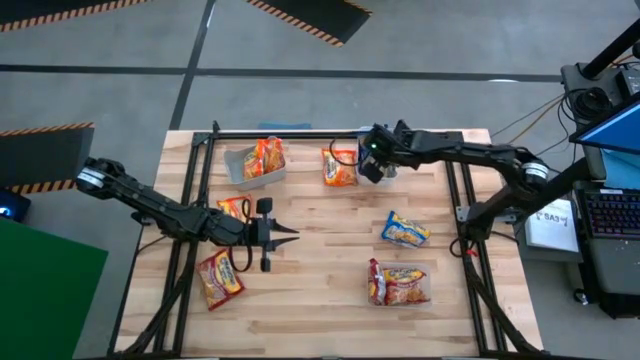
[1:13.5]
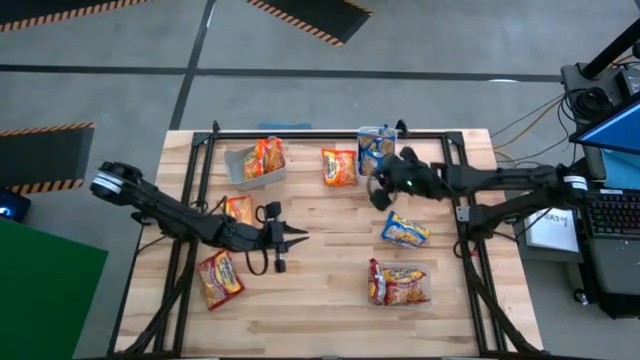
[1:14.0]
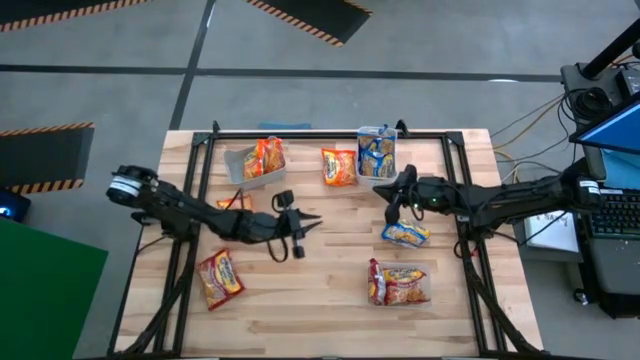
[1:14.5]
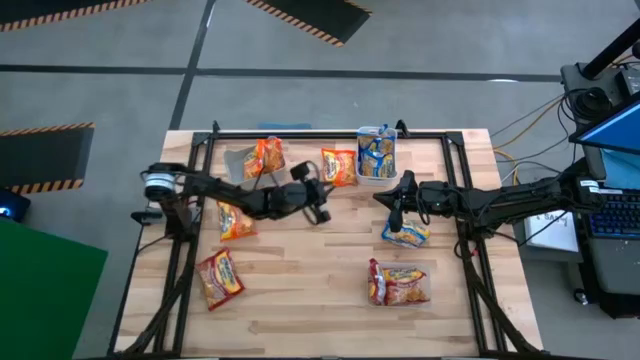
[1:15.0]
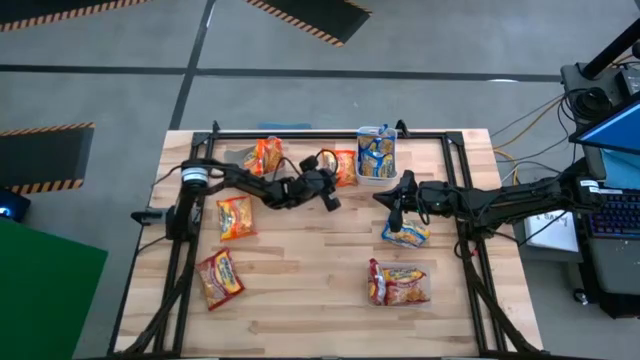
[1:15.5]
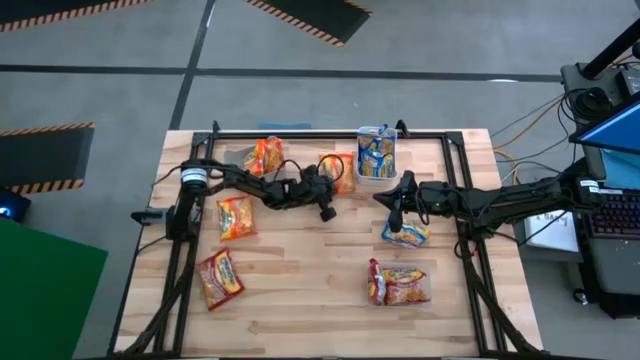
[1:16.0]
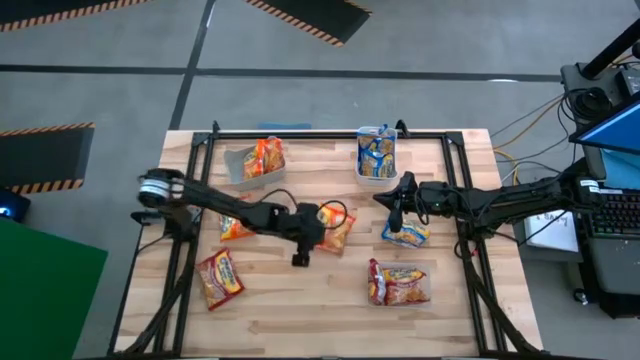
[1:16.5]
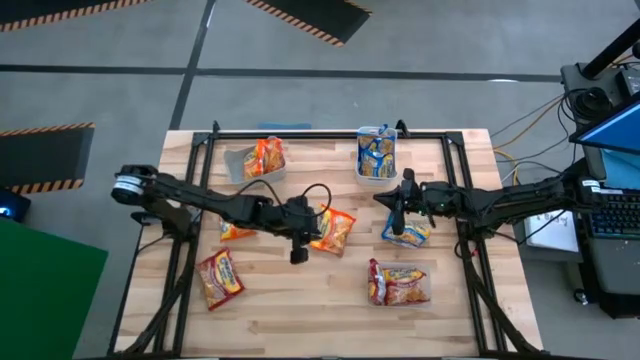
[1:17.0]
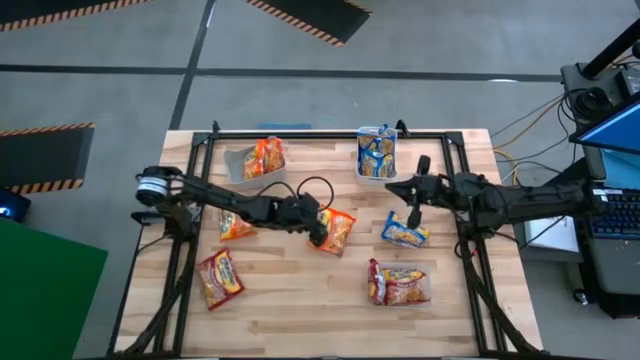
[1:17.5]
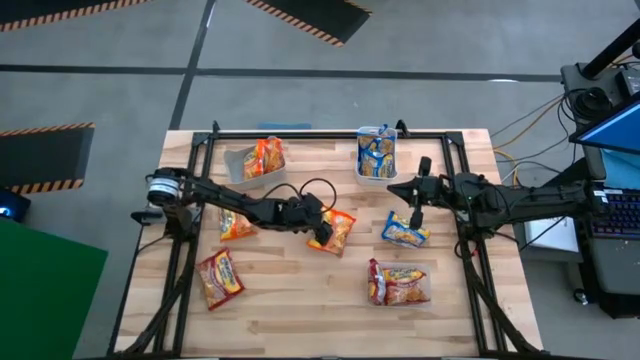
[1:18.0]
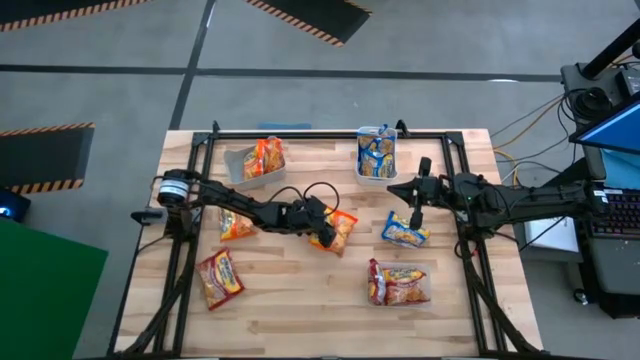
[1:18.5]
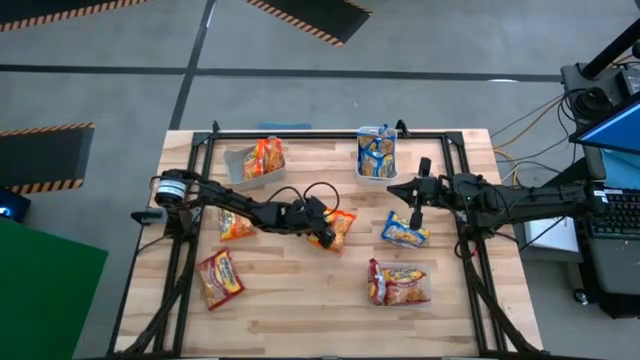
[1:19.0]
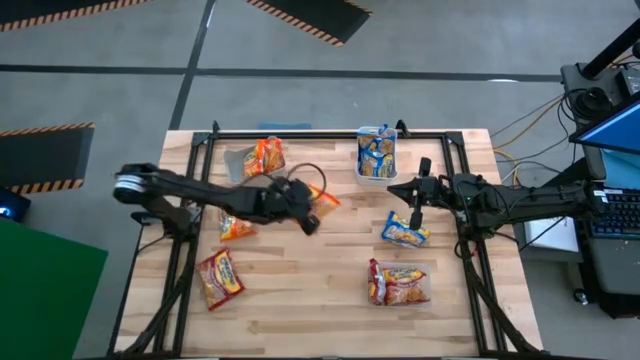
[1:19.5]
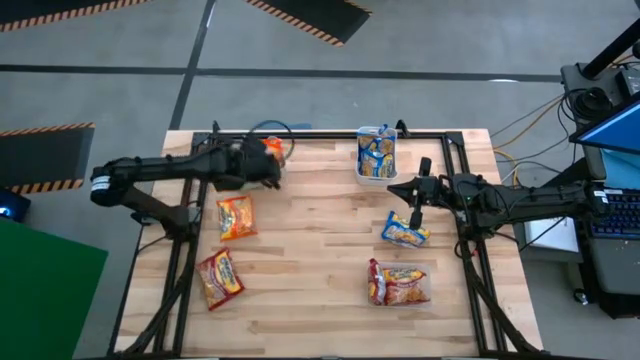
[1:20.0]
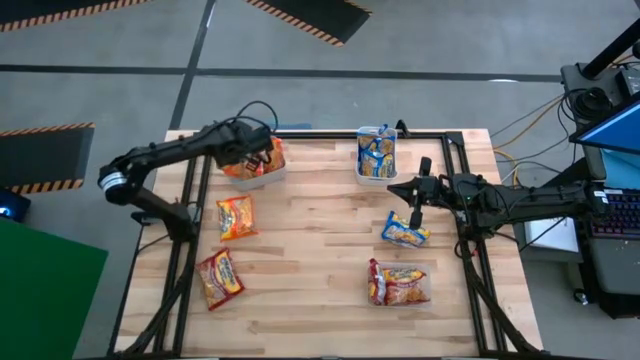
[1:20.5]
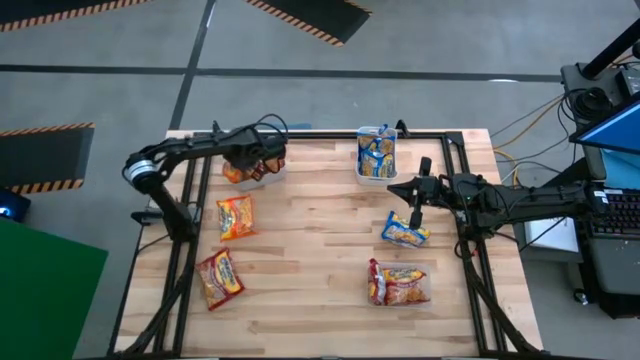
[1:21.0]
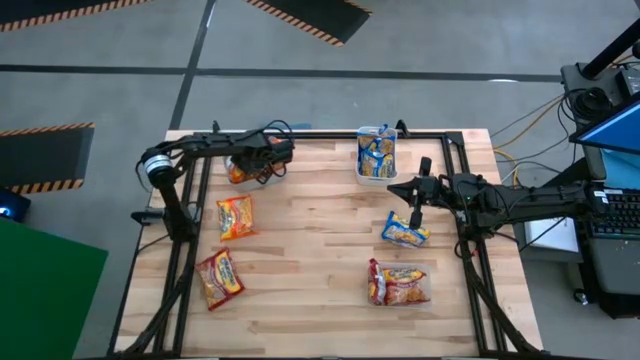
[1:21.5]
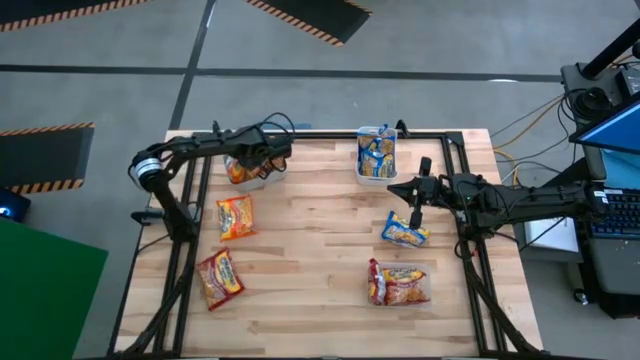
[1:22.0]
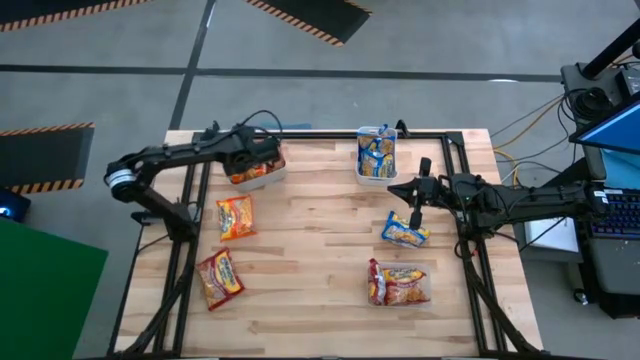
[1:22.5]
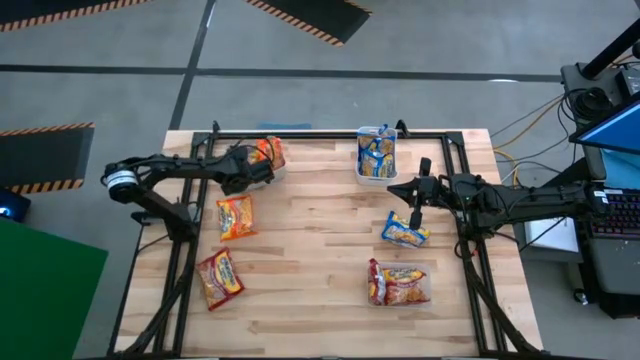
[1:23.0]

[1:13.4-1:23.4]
Task: Sort Maruchan noodles
Put the orange noodle pack into the gray bin

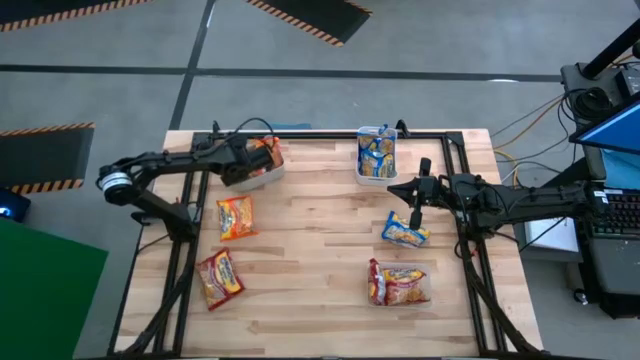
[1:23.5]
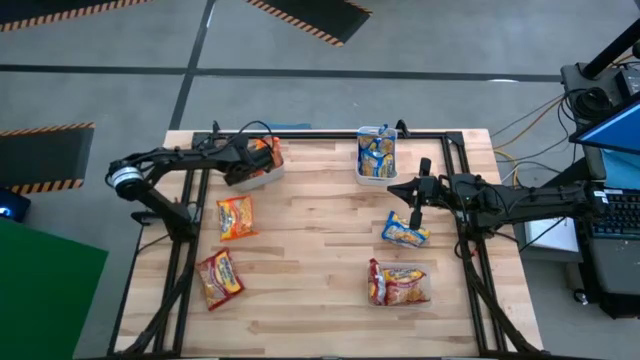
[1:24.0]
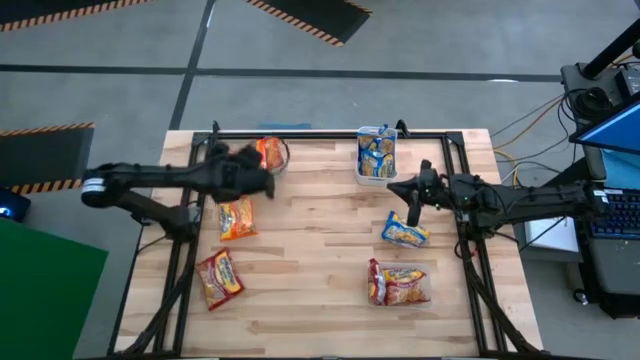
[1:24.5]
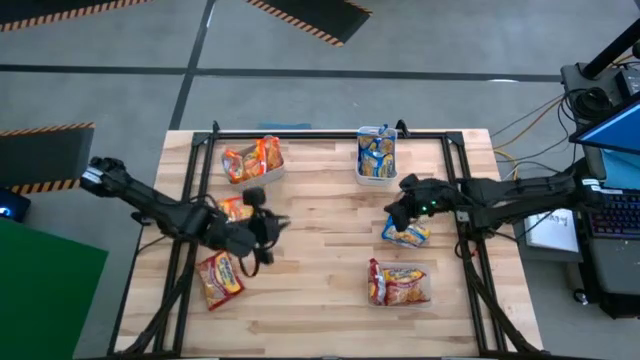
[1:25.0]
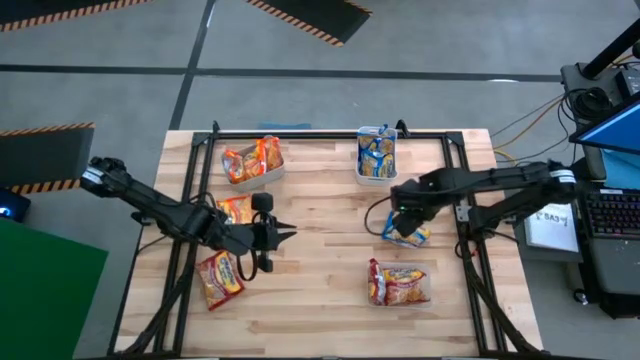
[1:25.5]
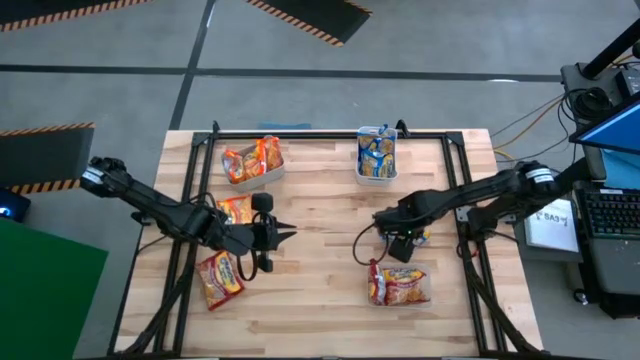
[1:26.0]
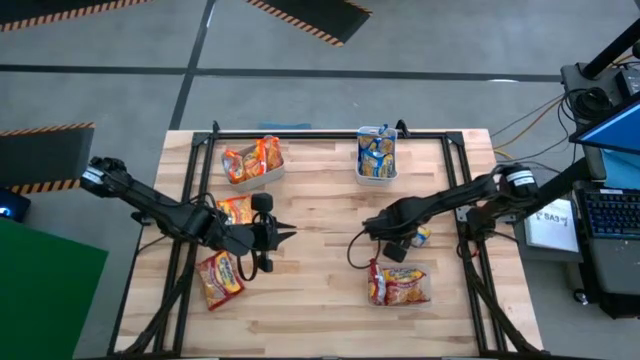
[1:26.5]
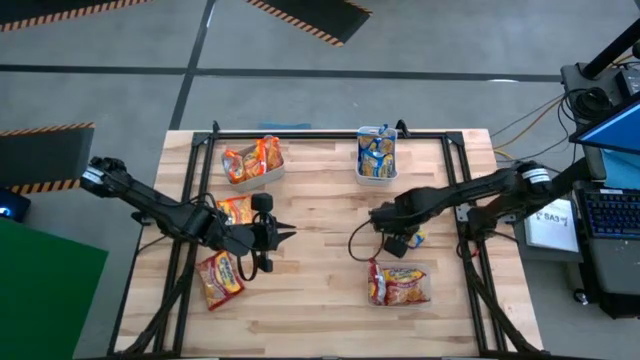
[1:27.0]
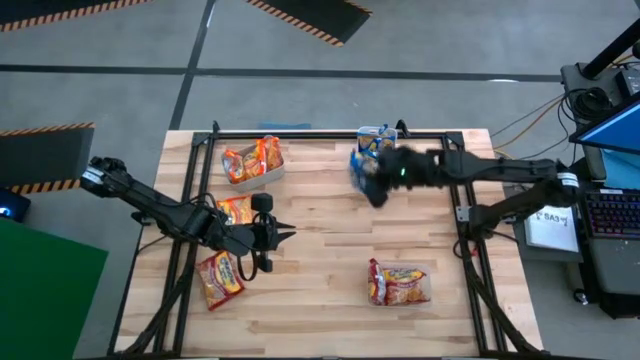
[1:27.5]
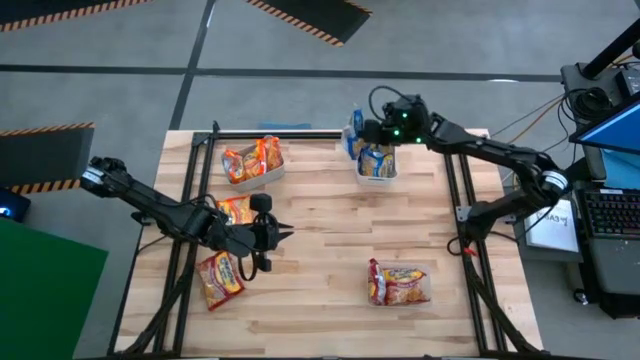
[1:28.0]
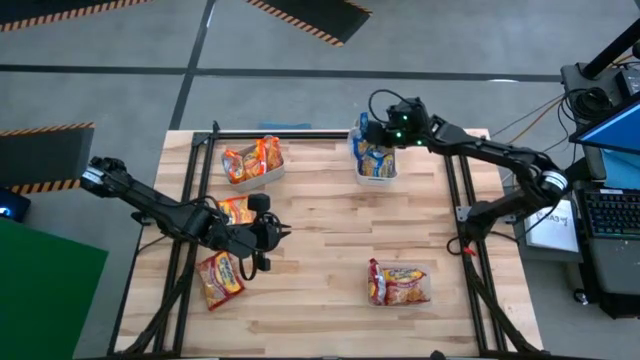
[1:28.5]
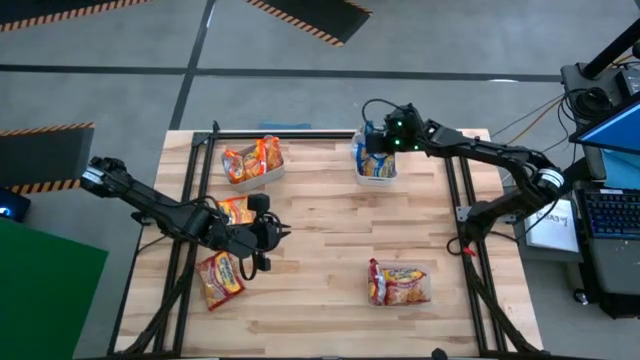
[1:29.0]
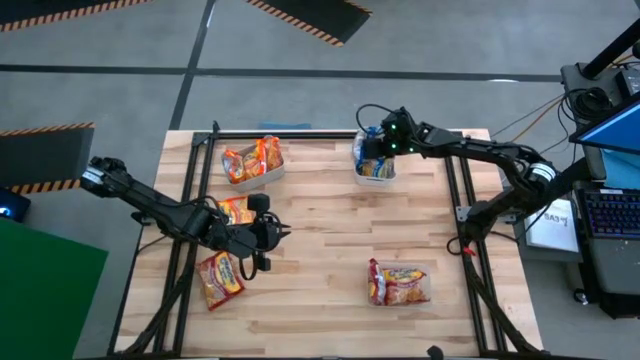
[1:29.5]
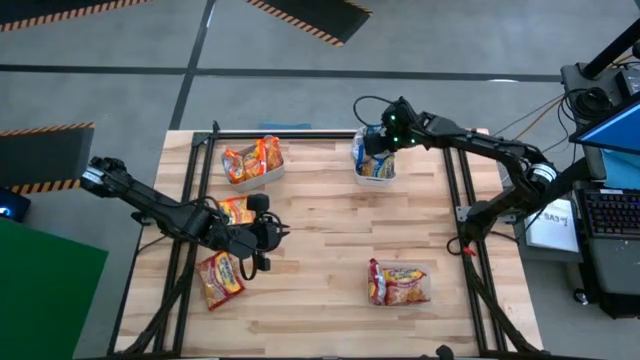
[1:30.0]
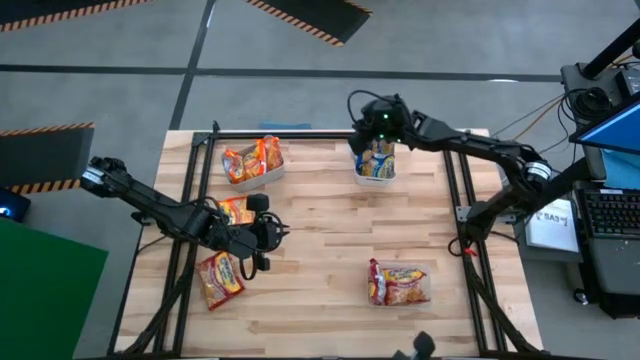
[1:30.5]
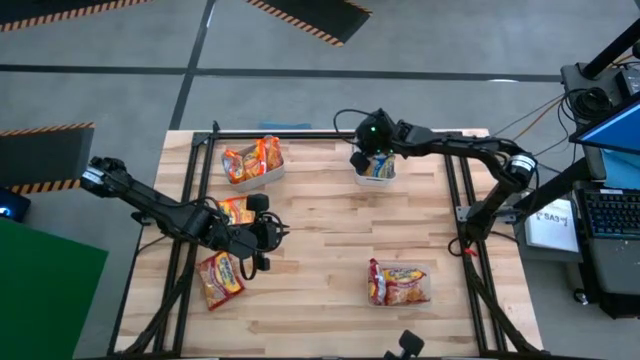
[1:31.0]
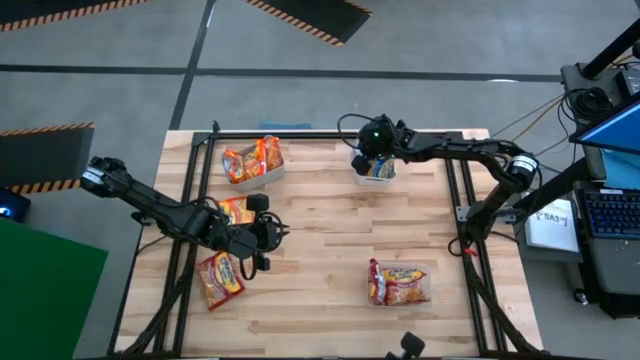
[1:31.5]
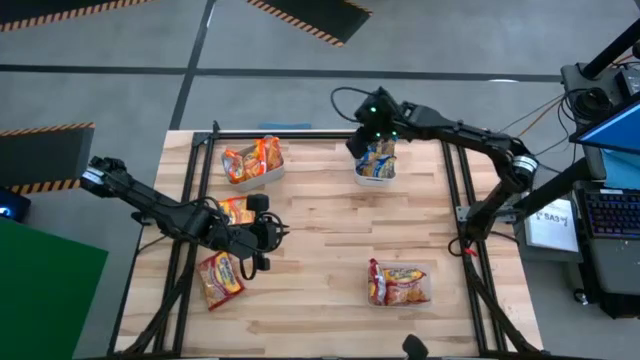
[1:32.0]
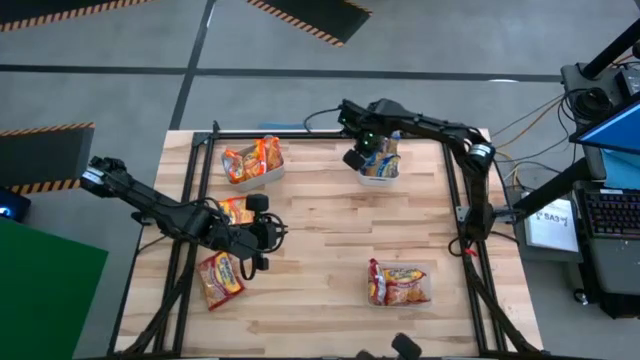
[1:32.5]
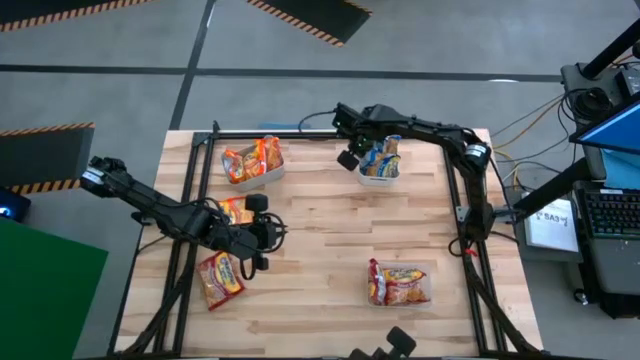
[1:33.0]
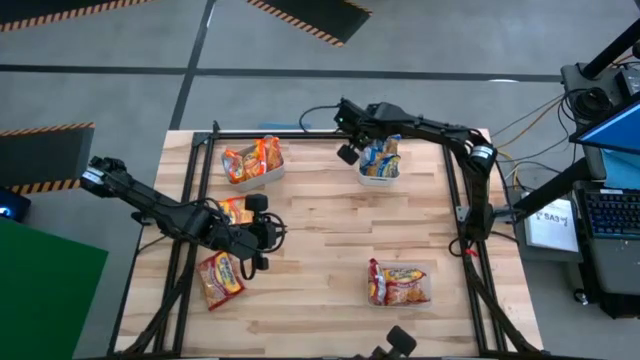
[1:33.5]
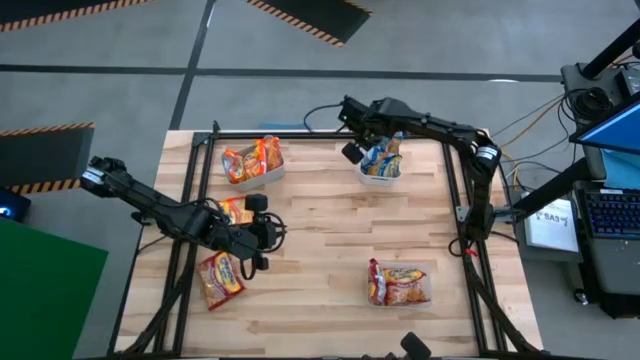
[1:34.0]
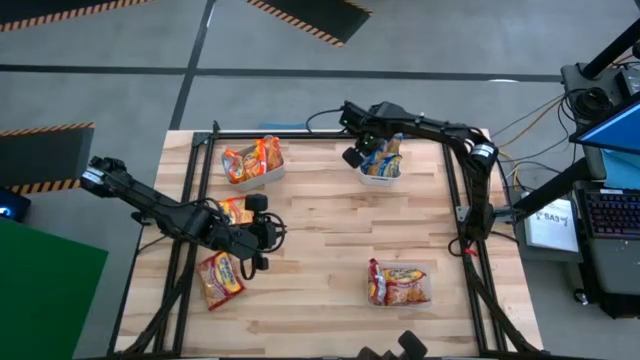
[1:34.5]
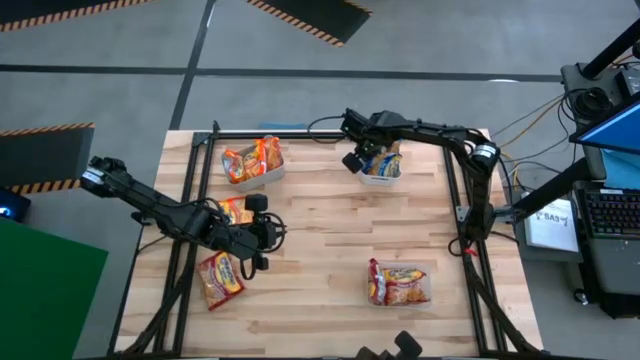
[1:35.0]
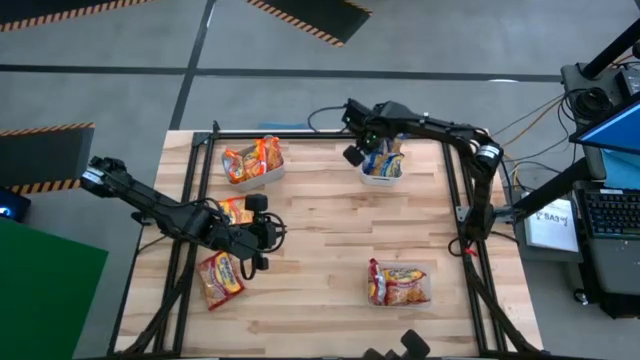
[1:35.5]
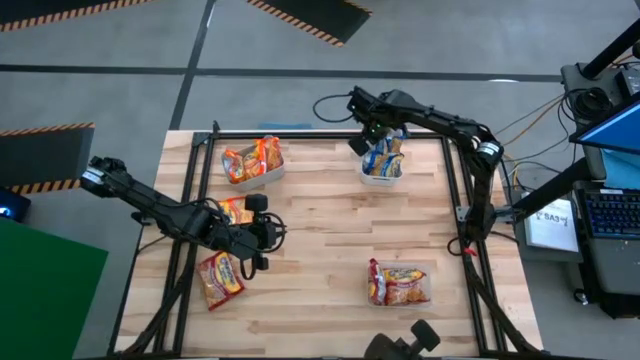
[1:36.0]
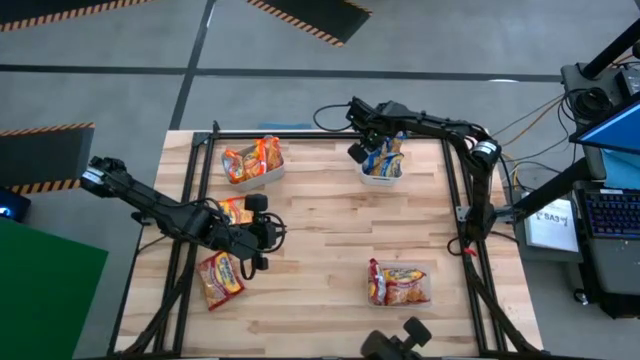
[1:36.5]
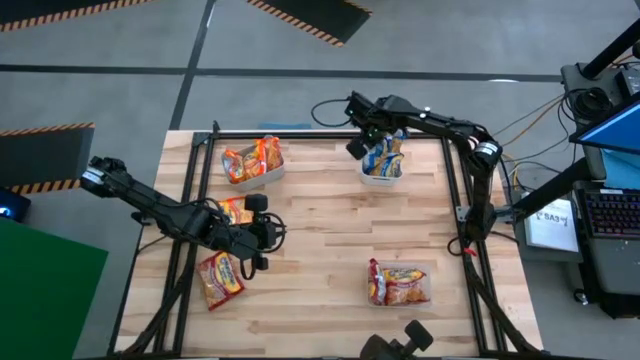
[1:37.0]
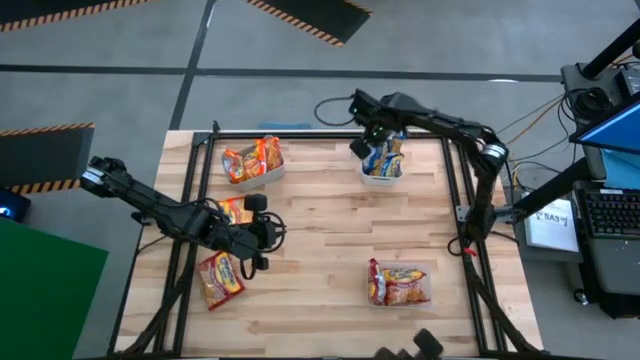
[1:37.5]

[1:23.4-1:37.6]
Put the blue noodle pack into the white bin
